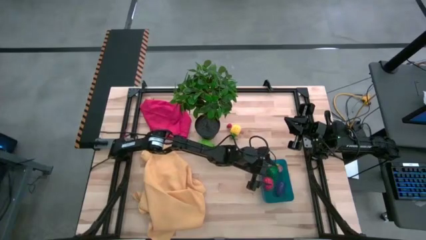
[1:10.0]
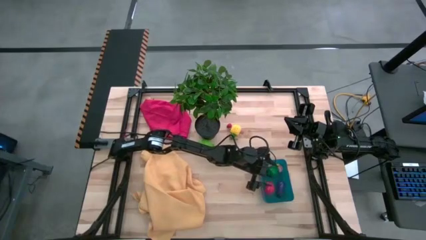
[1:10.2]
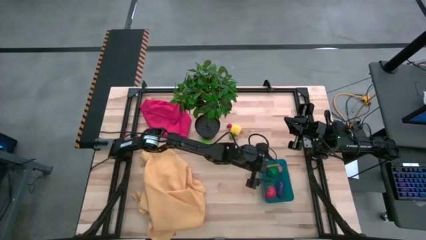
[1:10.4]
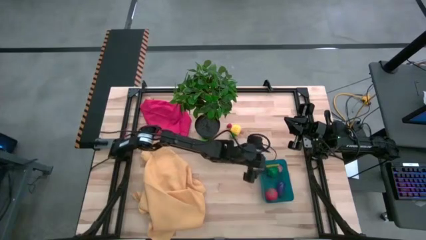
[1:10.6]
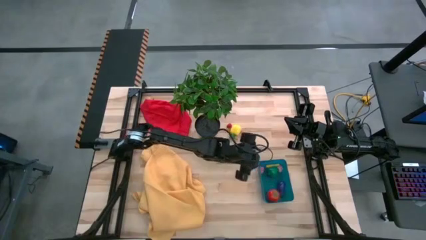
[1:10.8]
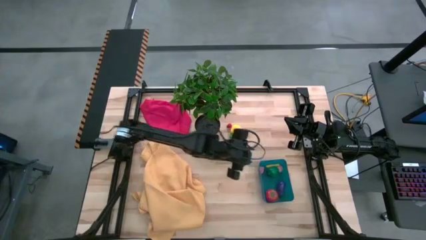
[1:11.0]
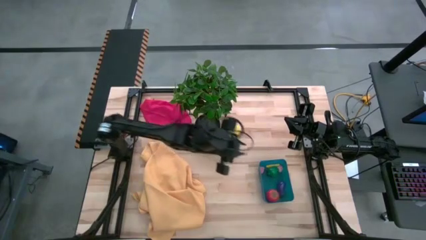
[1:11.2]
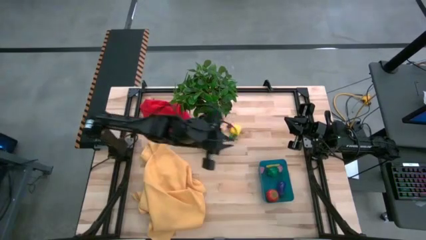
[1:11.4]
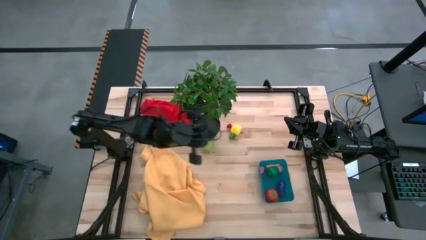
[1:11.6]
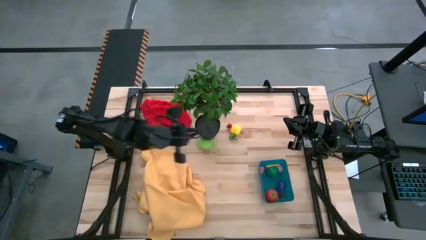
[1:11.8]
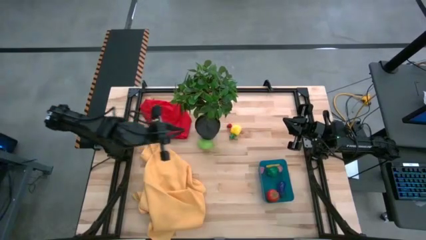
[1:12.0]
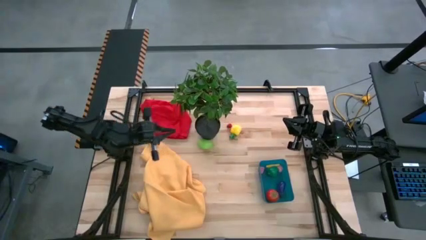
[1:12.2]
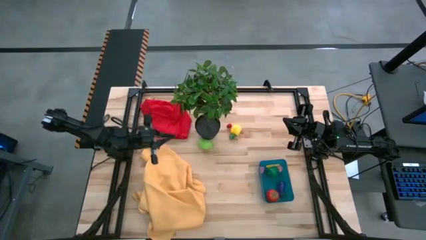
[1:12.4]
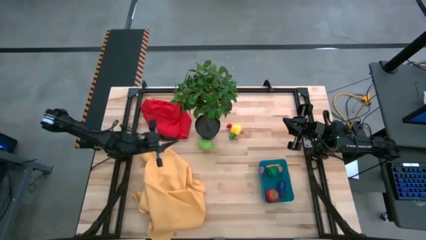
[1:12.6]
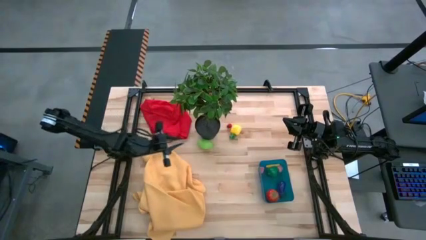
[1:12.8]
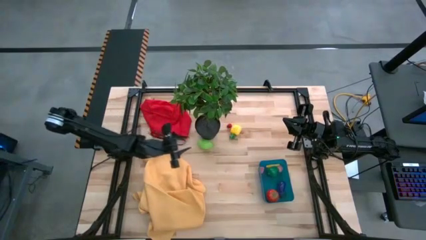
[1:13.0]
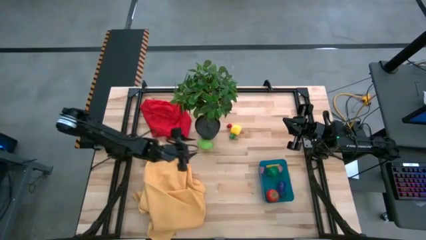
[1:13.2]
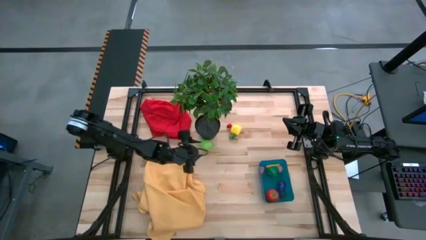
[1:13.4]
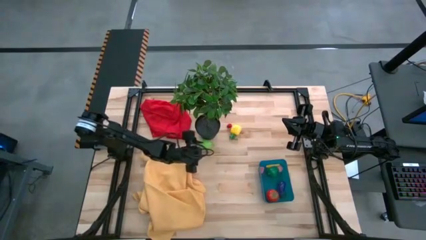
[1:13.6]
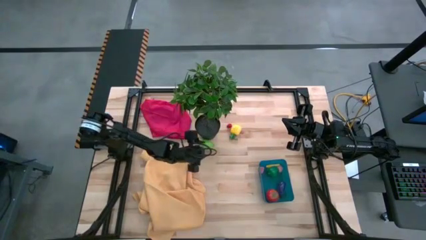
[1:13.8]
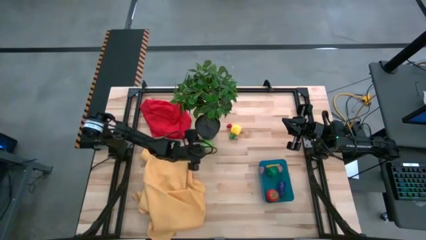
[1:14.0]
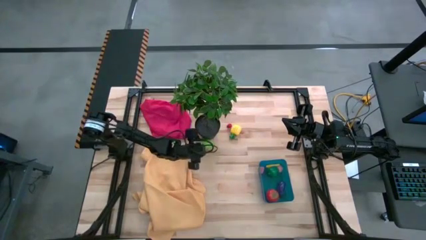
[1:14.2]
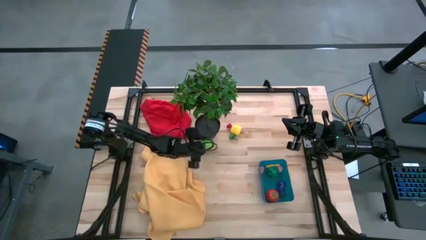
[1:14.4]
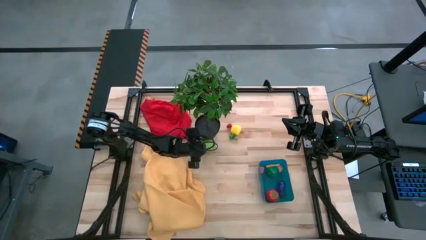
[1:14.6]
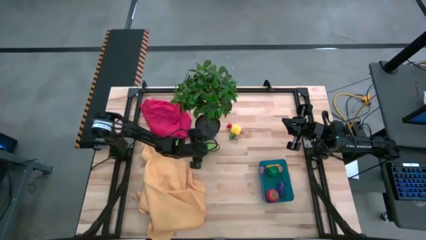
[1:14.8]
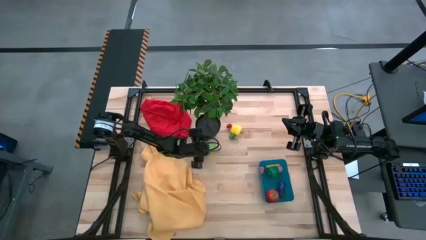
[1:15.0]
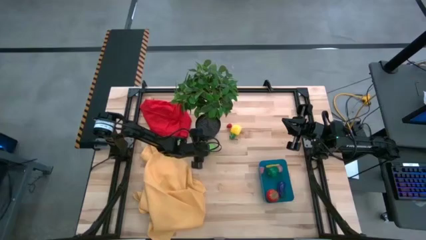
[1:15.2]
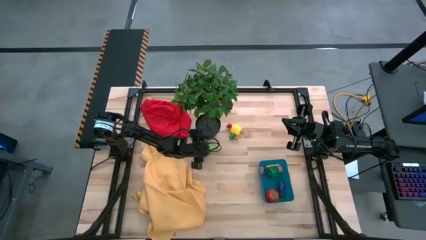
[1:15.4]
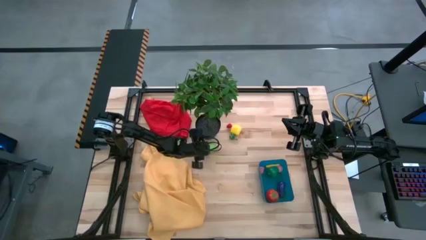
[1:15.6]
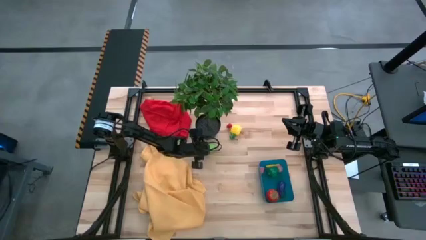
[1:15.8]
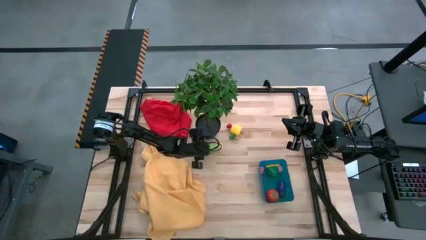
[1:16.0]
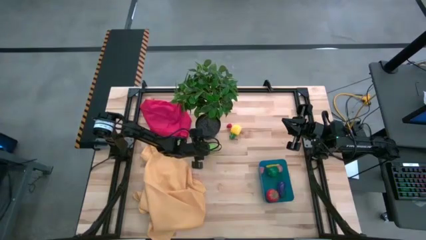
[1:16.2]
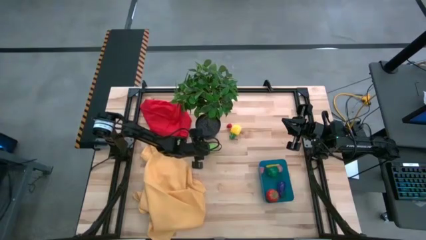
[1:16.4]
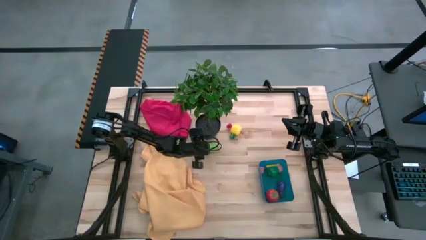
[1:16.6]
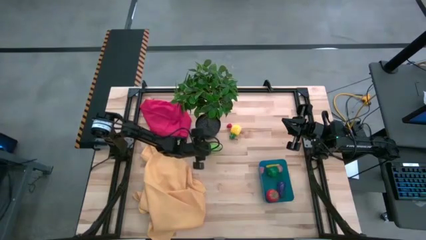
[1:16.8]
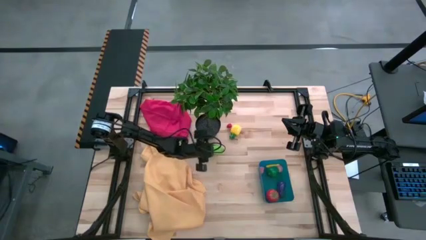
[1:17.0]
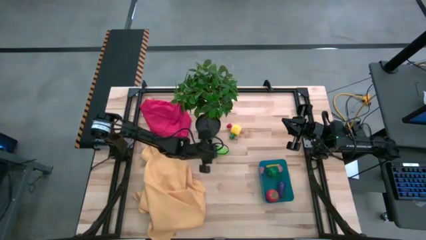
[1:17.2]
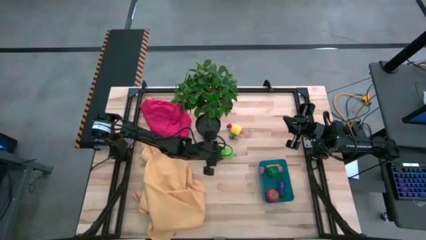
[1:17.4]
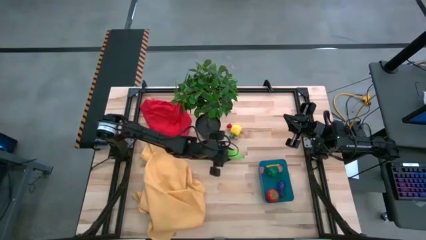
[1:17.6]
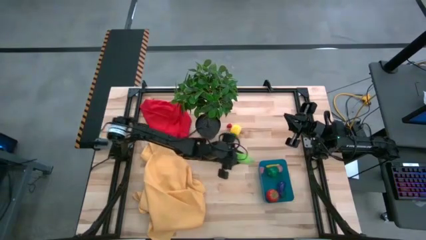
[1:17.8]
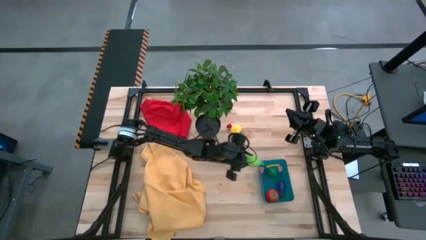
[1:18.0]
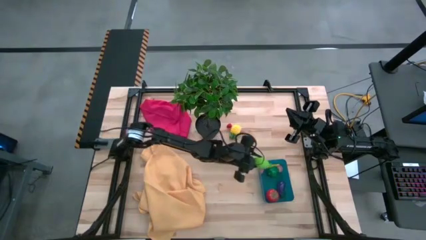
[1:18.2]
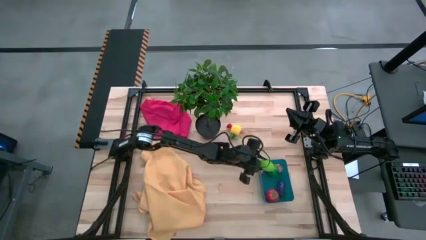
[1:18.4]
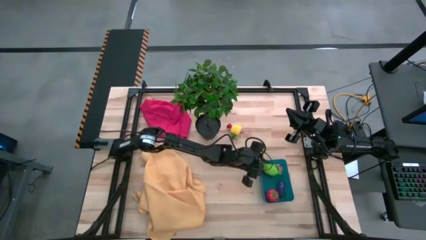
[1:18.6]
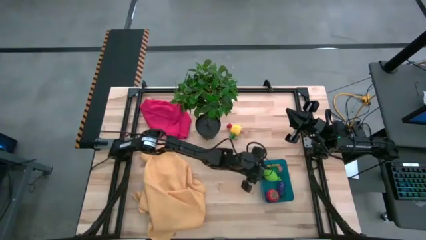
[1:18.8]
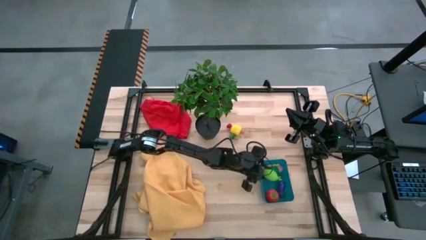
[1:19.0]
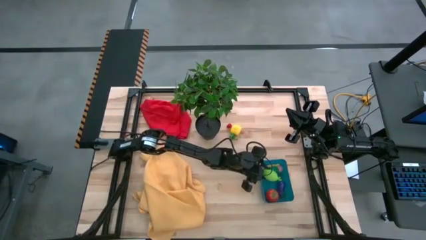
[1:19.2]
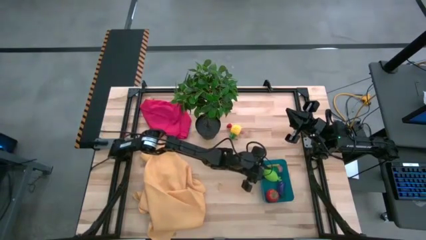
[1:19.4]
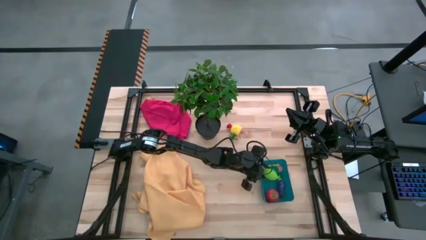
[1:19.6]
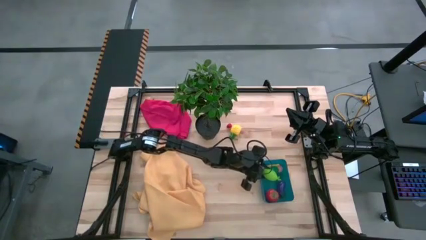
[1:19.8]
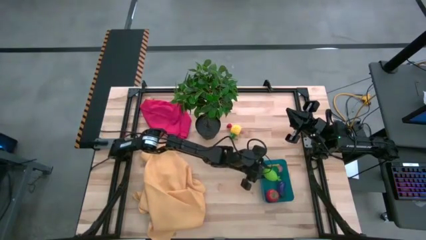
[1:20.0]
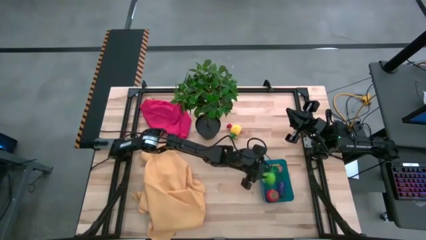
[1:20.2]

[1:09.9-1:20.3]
Task: Pick and placing Produce into tupperware
Put the melon into the bin
